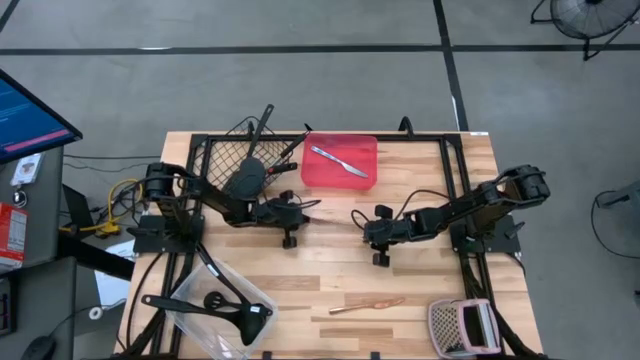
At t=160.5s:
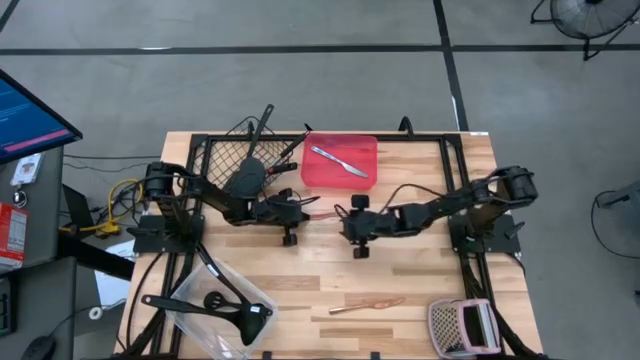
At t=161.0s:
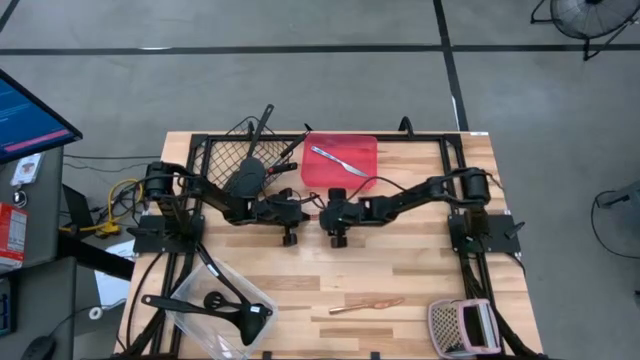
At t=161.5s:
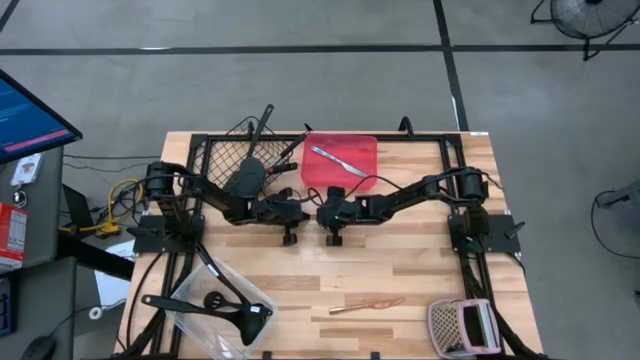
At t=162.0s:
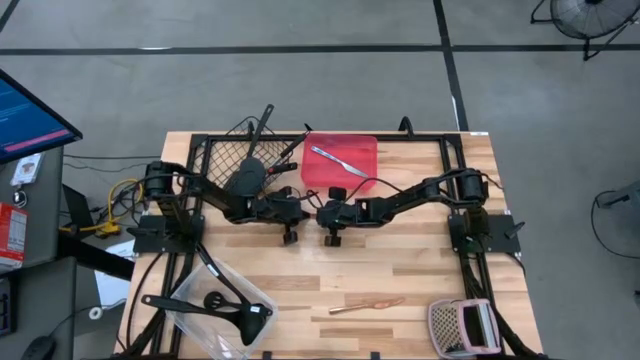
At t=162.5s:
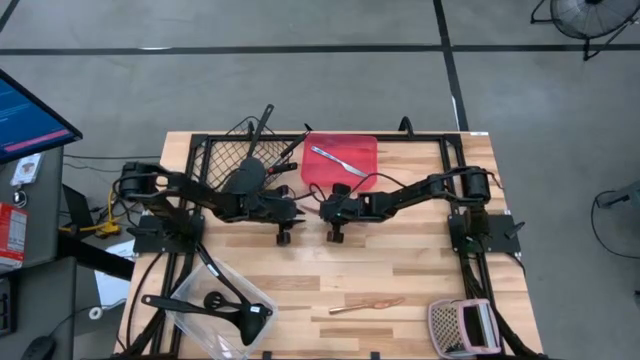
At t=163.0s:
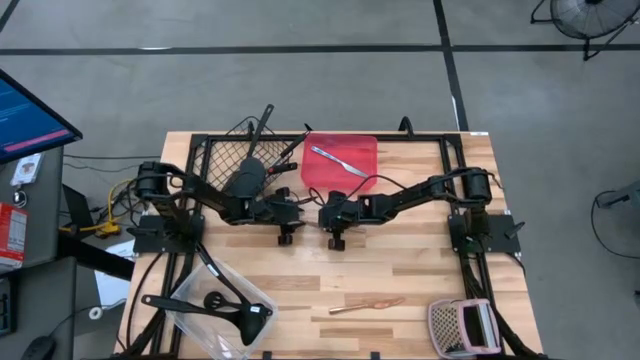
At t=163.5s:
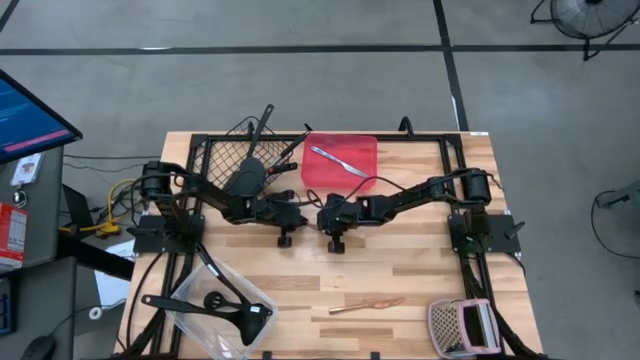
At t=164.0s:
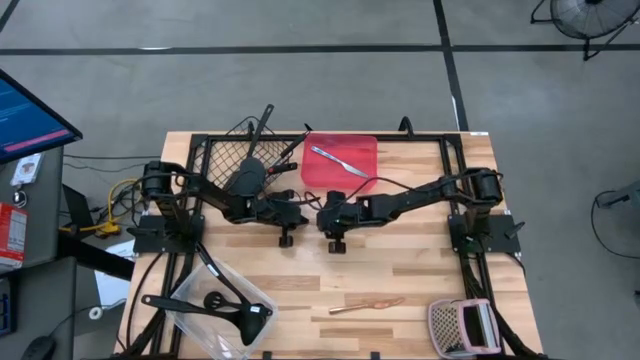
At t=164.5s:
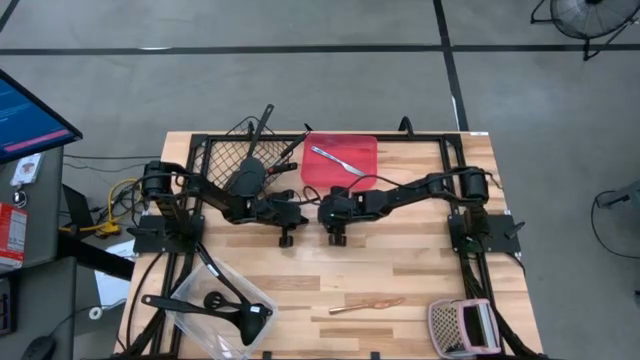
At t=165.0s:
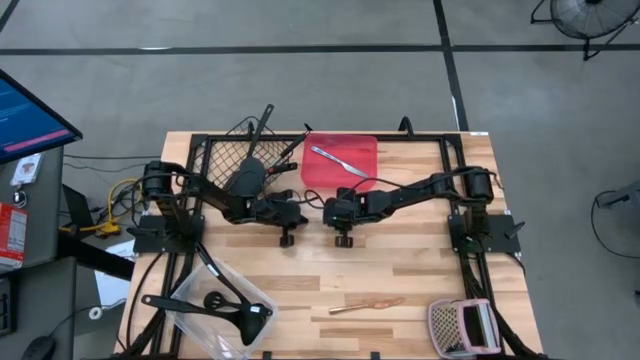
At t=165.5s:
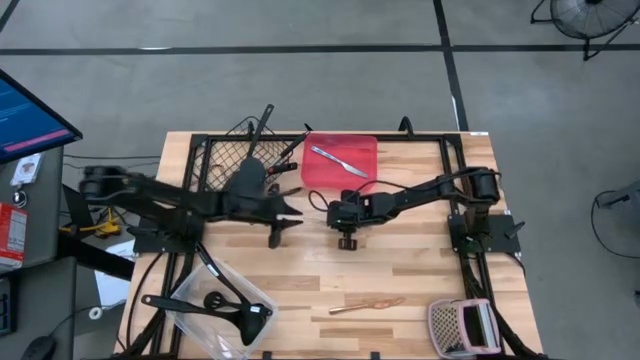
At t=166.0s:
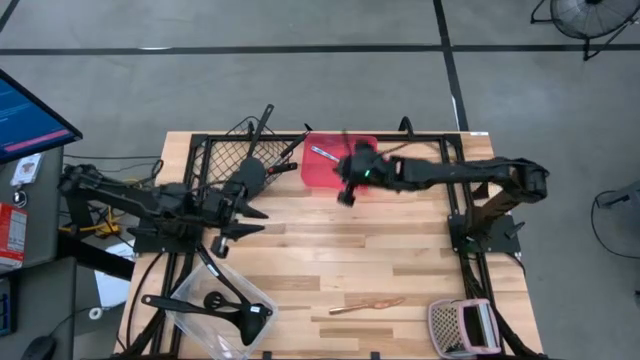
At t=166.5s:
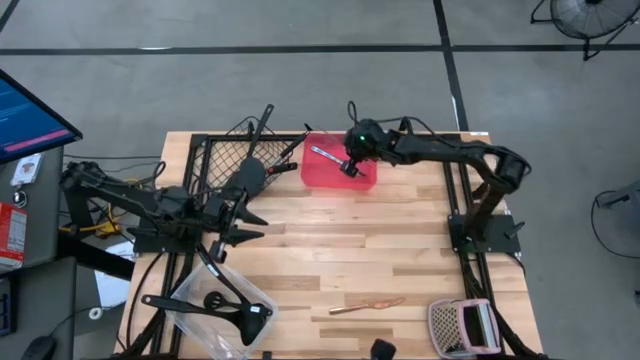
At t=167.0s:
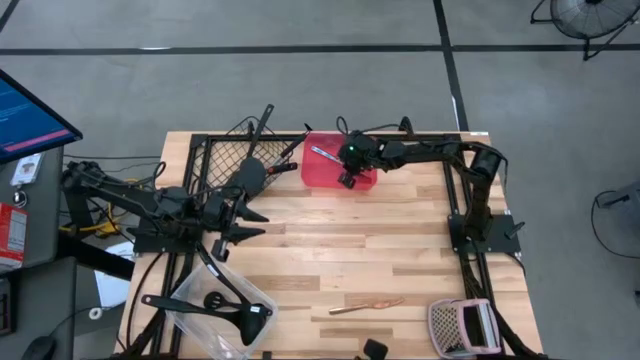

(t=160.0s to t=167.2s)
Task: Pick & Place Kitchen Items
Put the gold table knife into the red bin

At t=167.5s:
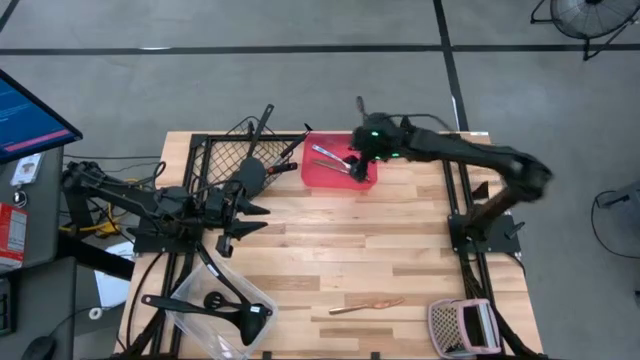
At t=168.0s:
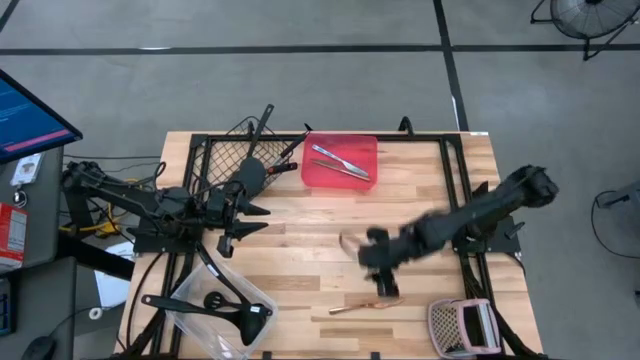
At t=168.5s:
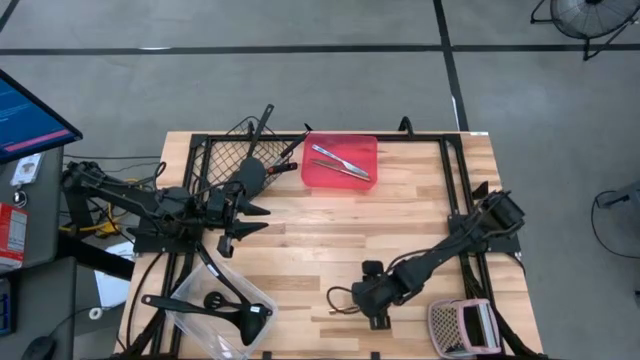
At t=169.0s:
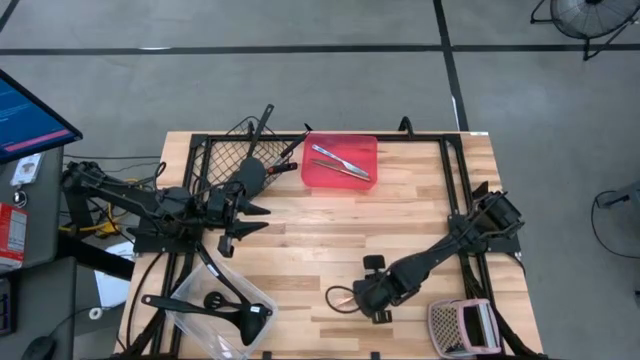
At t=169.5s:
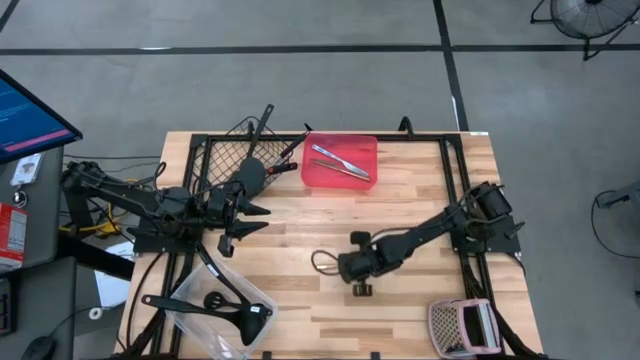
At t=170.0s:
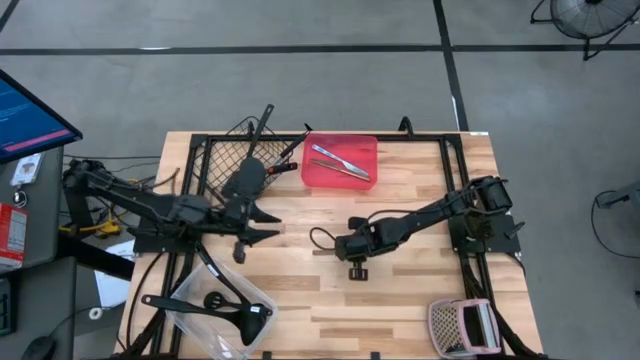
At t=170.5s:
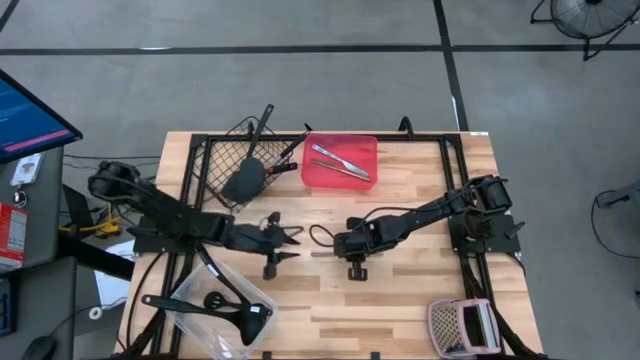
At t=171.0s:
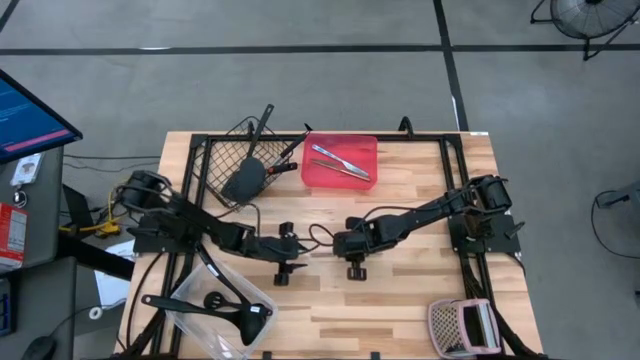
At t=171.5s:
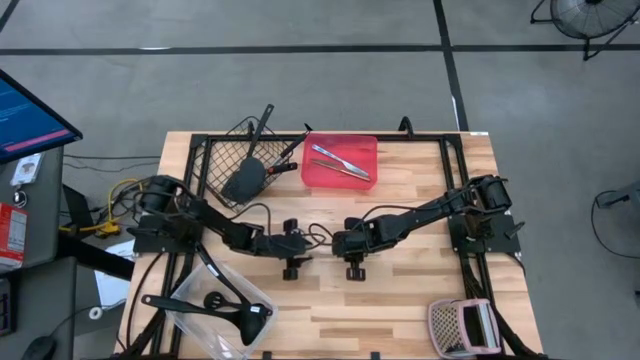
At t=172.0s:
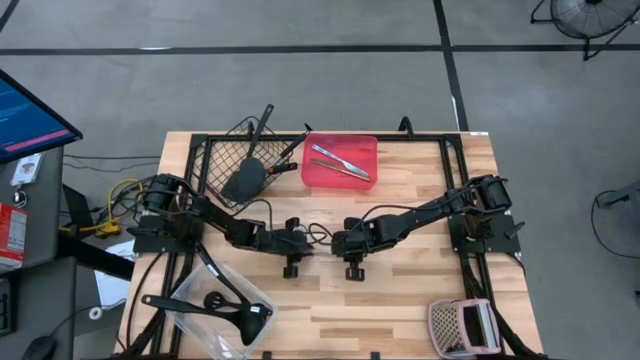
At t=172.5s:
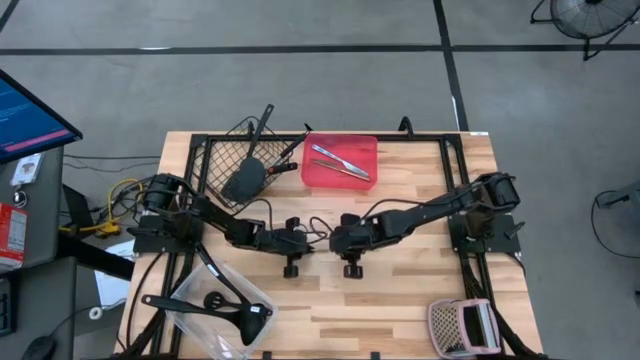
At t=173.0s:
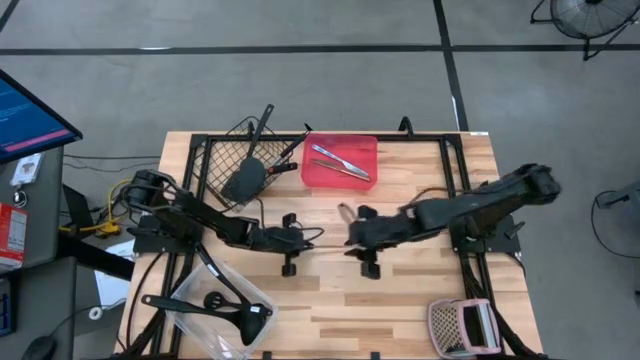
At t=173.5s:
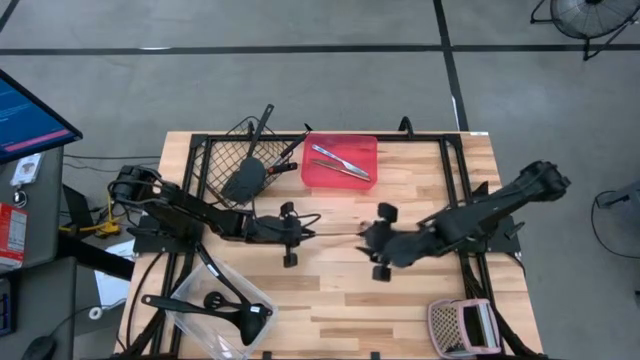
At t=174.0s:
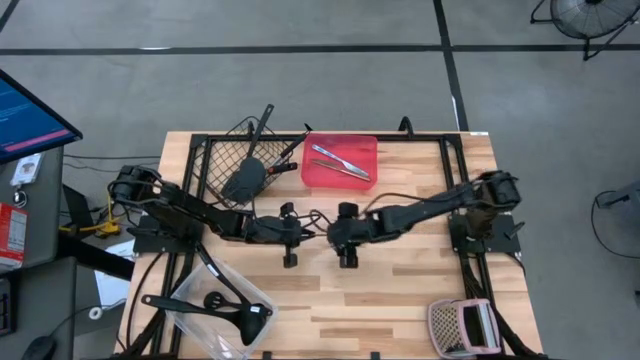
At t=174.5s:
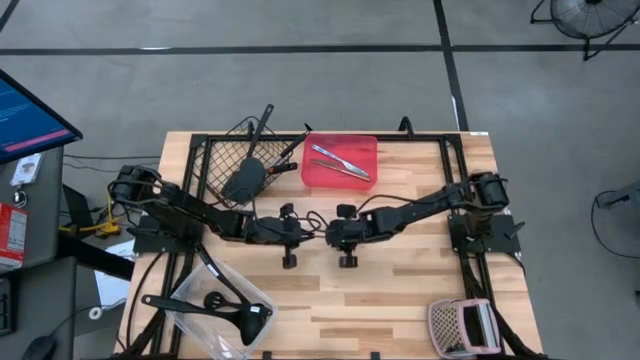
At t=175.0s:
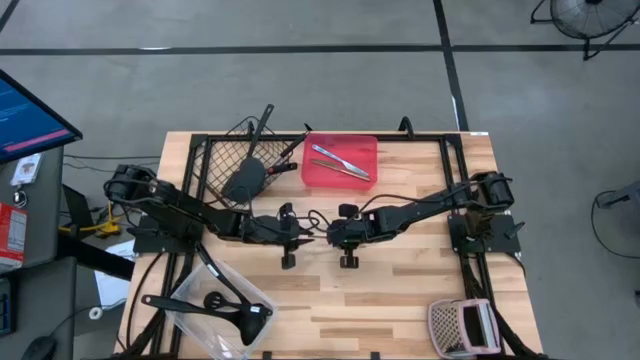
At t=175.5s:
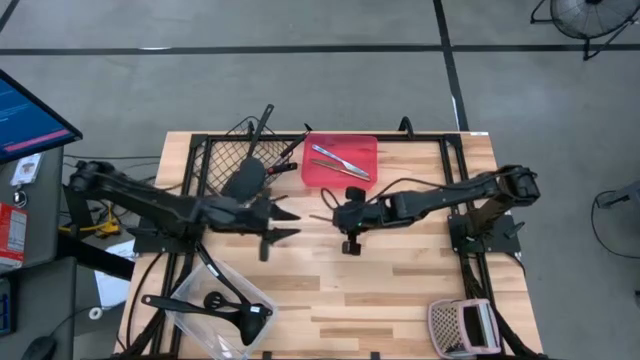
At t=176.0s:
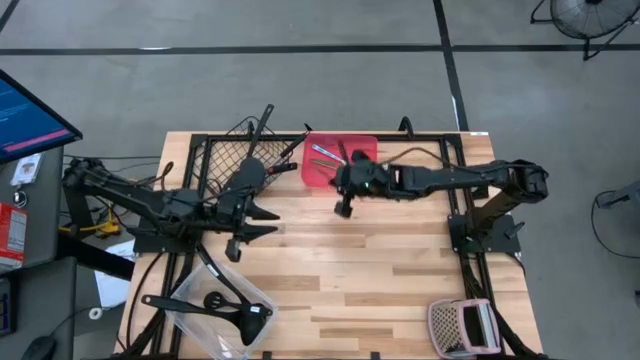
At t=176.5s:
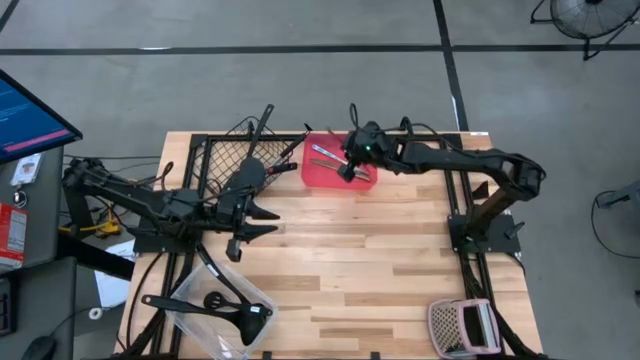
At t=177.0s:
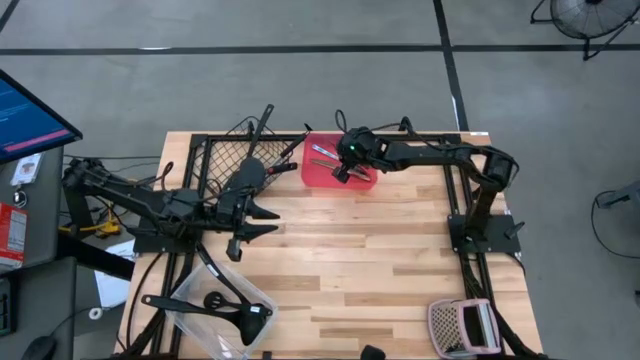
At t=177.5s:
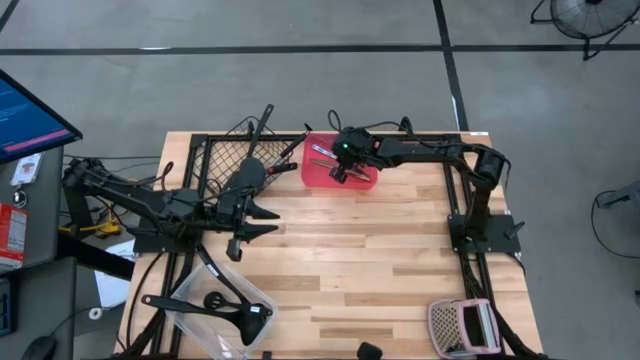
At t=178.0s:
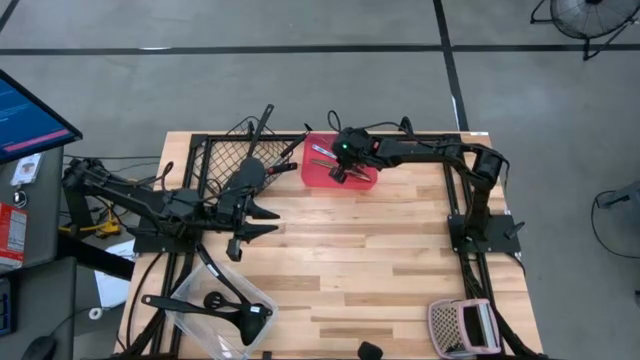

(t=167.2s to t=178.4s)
Put the gold table knife into the red bin

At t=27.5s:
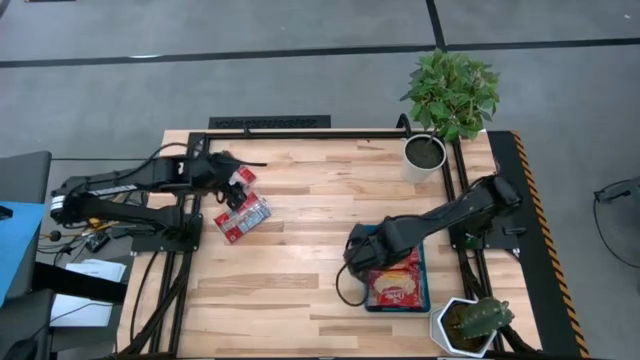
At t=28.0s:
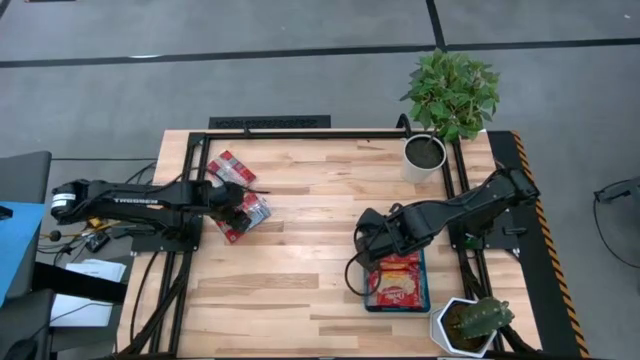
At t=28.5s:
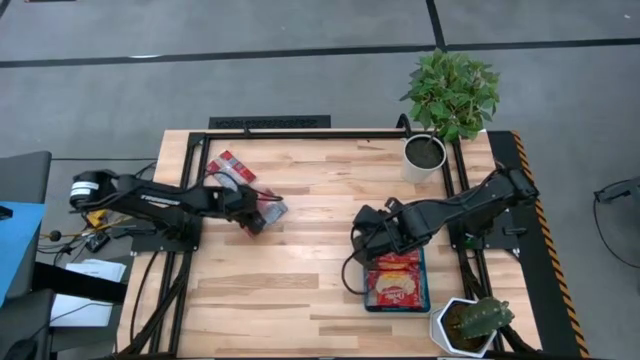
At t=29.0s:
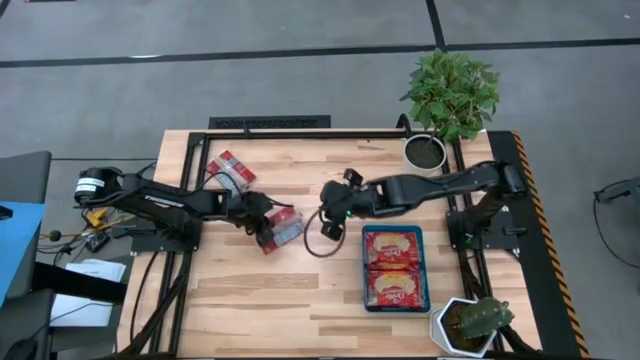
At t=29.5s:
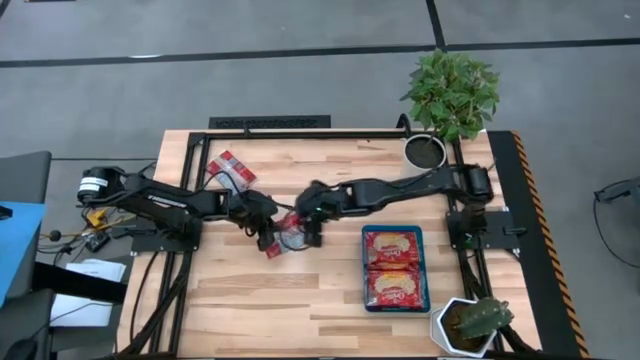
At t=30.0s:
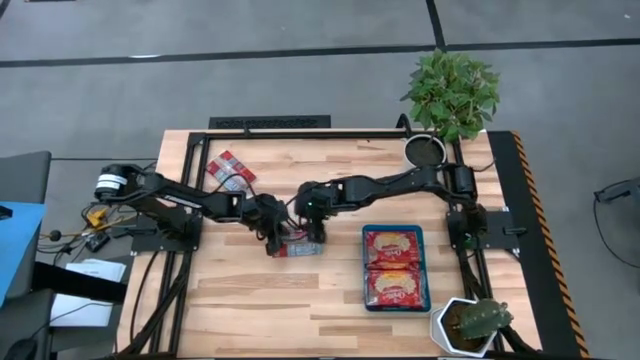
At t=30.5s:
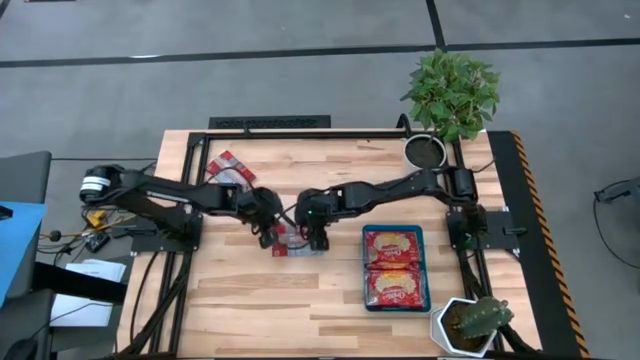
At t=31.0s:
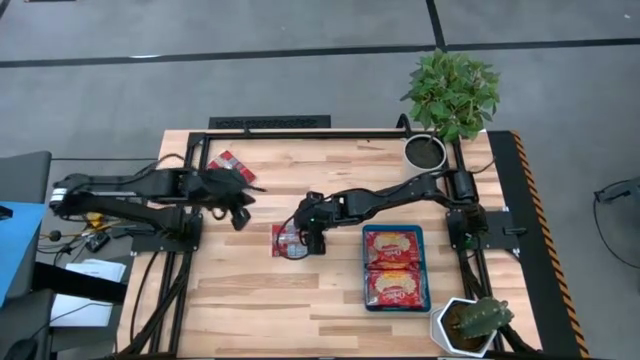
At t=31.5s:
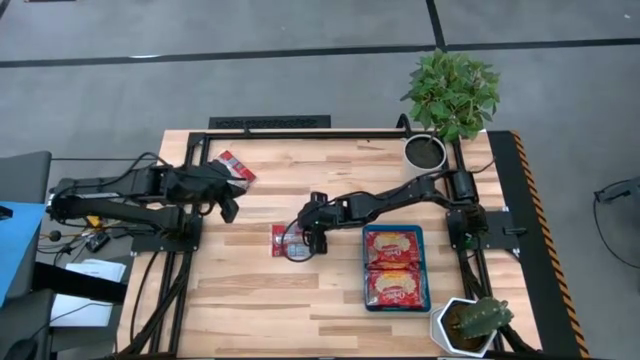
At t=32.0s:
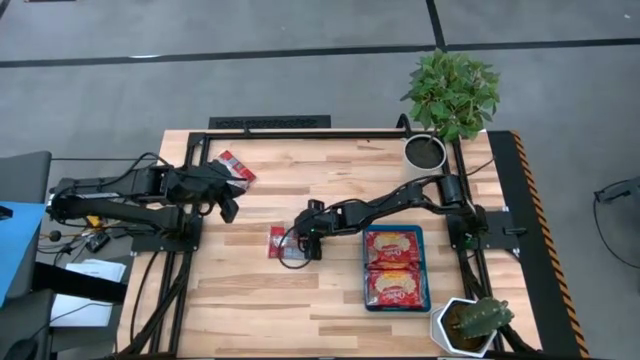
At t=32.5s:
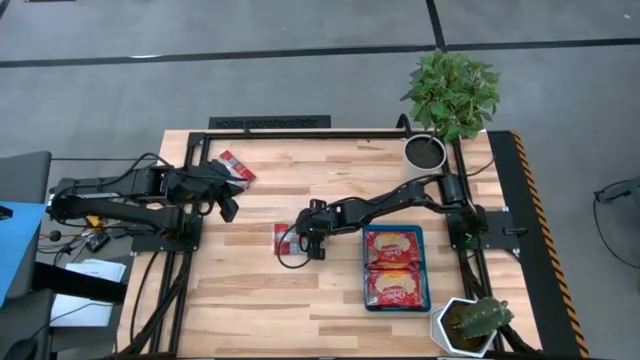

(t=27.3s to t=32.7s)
Task: Sort popcorn bags into baskets
Put the bottom red popcorn bag into the blue bin
